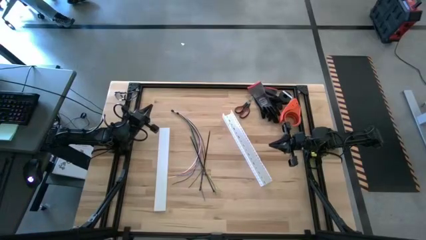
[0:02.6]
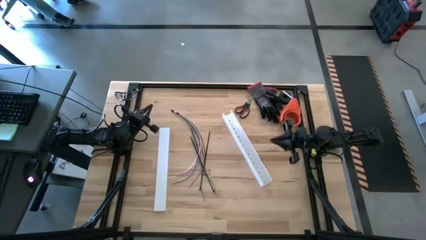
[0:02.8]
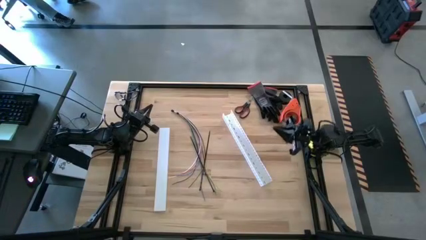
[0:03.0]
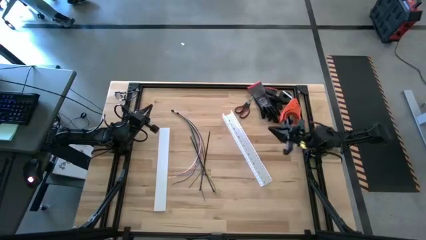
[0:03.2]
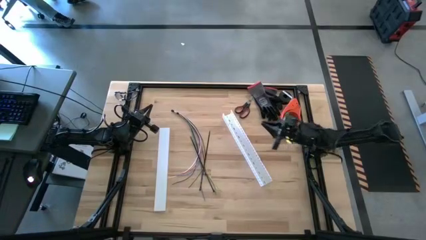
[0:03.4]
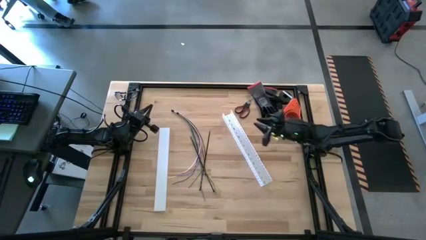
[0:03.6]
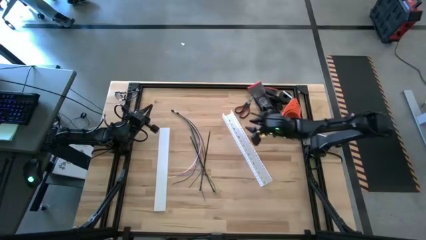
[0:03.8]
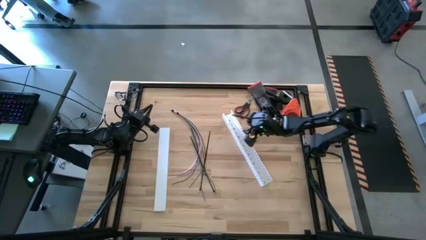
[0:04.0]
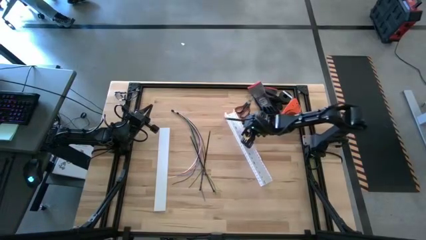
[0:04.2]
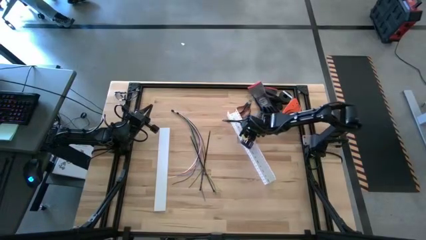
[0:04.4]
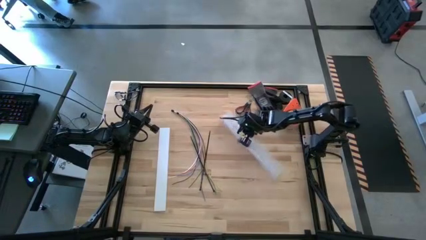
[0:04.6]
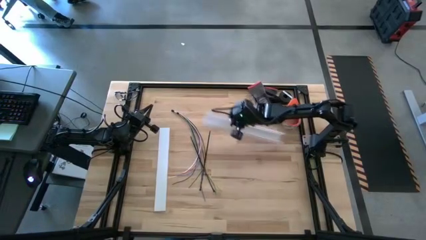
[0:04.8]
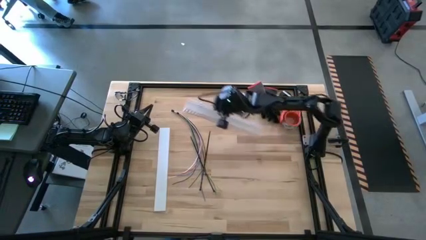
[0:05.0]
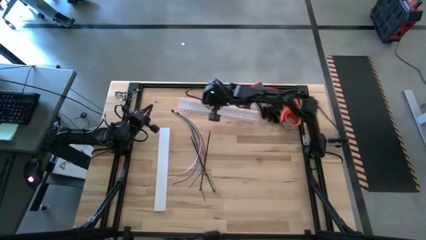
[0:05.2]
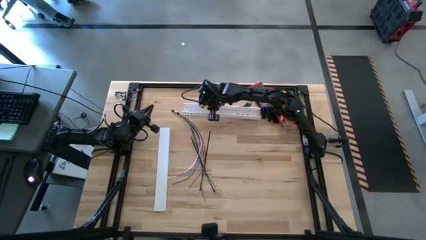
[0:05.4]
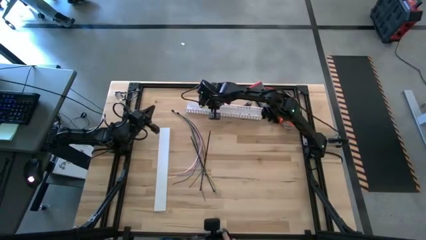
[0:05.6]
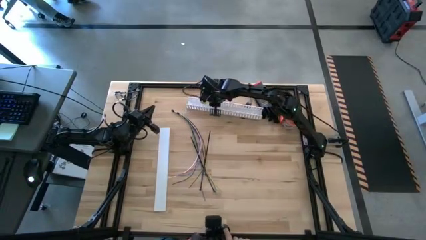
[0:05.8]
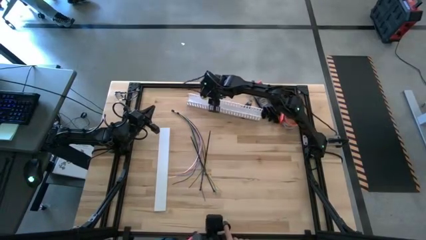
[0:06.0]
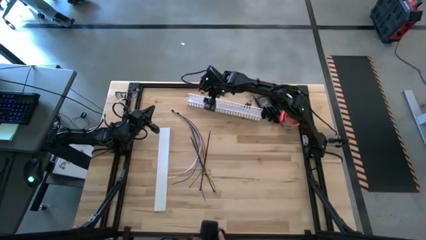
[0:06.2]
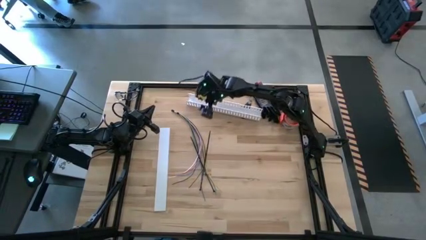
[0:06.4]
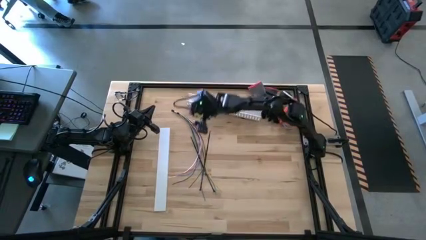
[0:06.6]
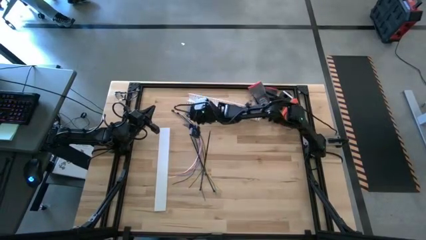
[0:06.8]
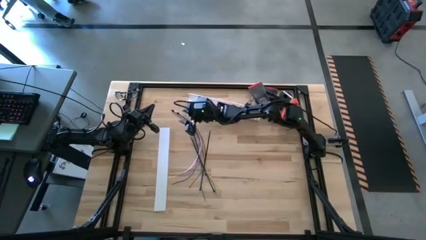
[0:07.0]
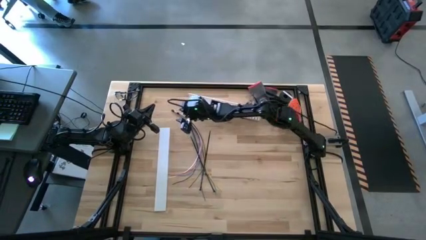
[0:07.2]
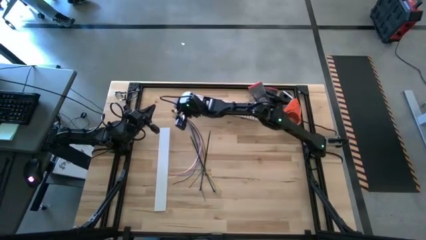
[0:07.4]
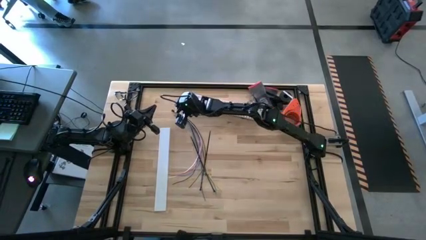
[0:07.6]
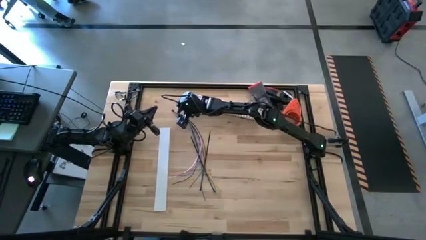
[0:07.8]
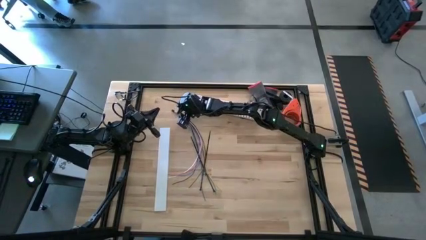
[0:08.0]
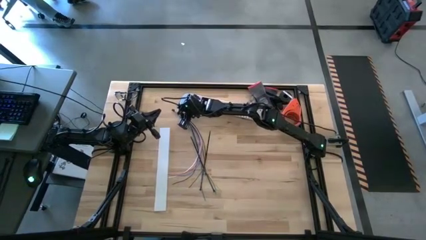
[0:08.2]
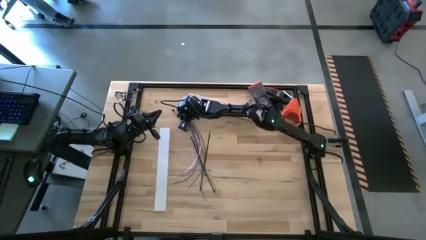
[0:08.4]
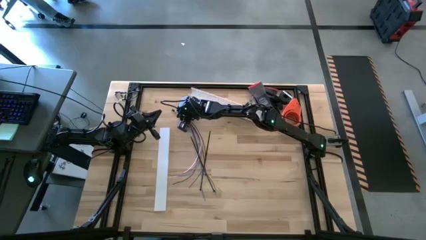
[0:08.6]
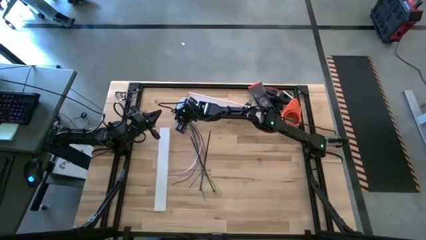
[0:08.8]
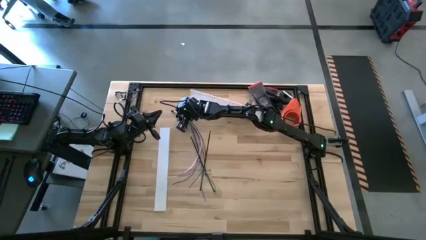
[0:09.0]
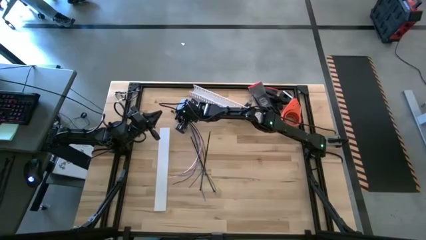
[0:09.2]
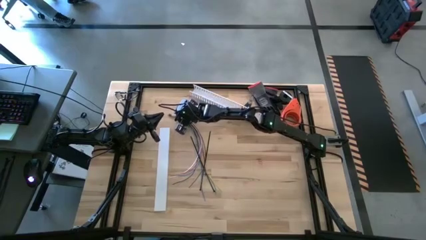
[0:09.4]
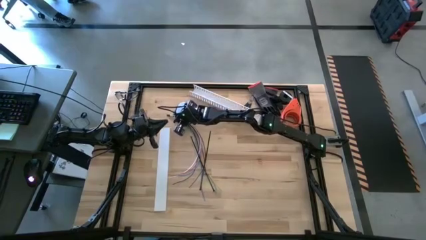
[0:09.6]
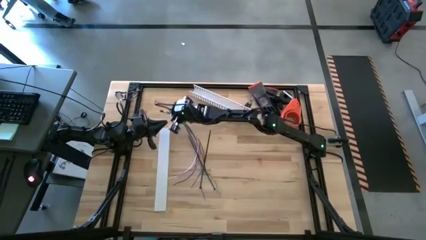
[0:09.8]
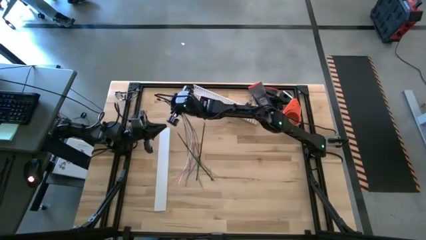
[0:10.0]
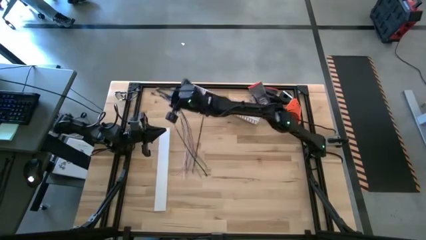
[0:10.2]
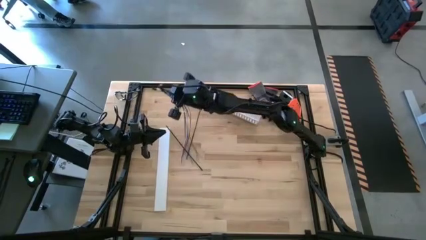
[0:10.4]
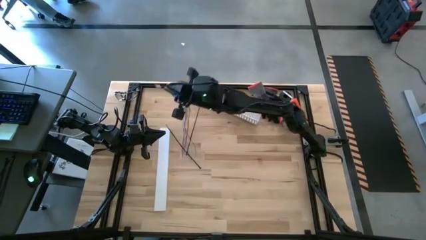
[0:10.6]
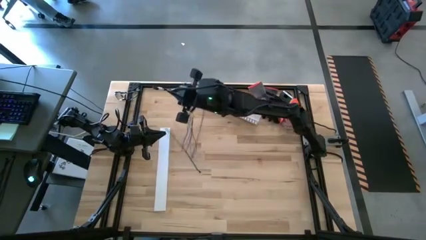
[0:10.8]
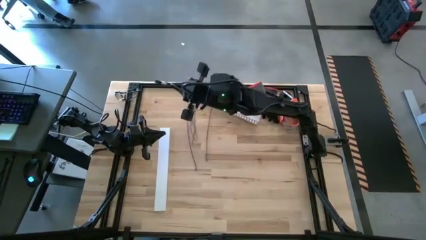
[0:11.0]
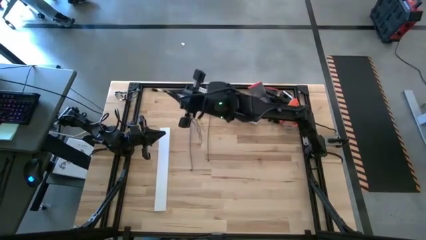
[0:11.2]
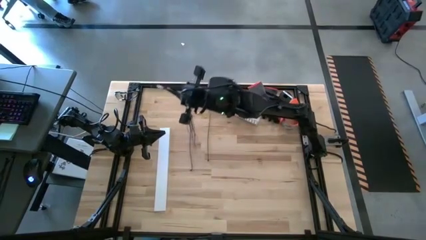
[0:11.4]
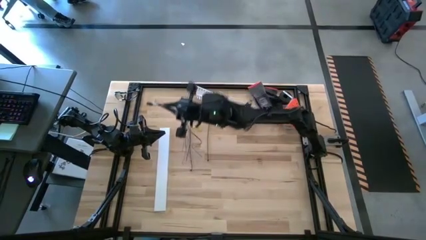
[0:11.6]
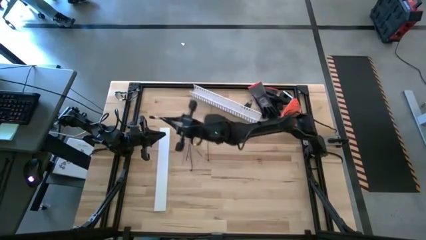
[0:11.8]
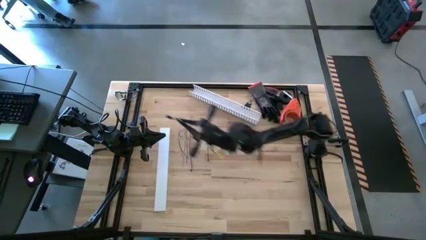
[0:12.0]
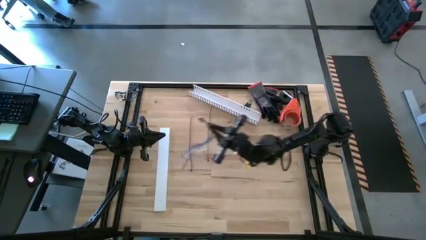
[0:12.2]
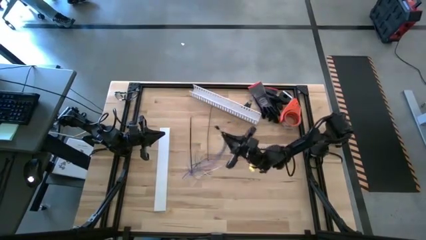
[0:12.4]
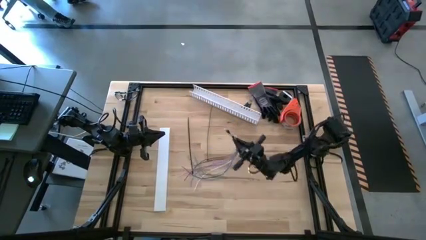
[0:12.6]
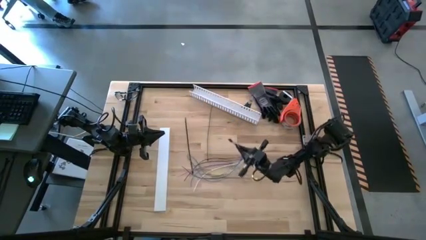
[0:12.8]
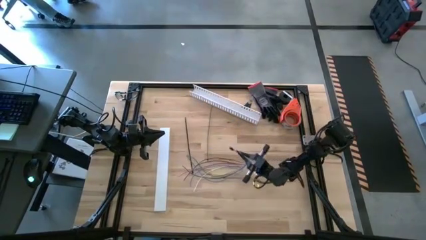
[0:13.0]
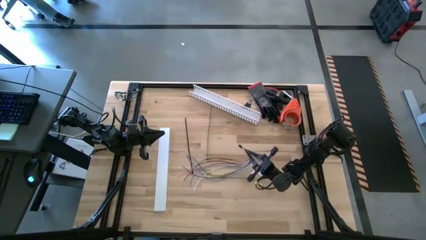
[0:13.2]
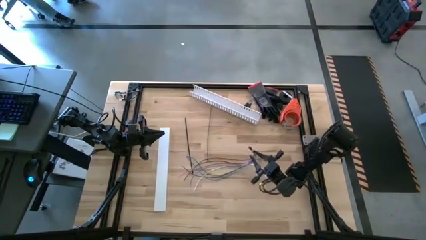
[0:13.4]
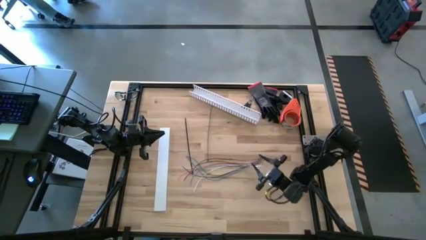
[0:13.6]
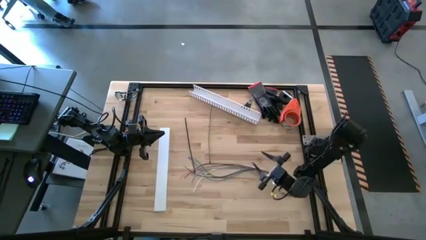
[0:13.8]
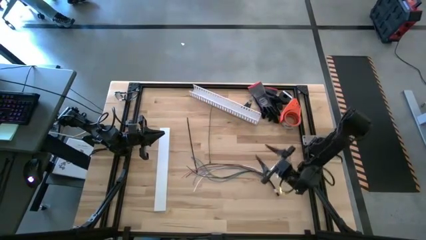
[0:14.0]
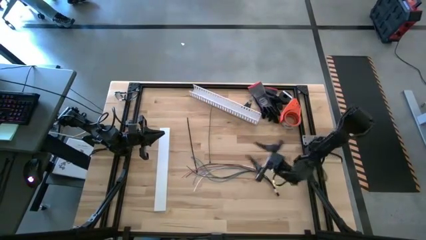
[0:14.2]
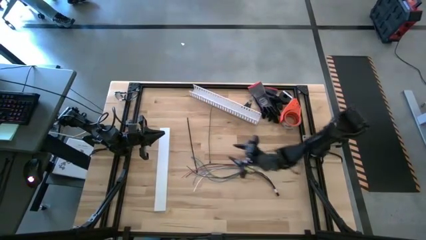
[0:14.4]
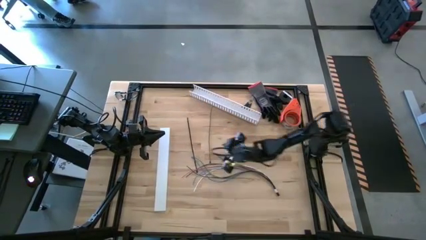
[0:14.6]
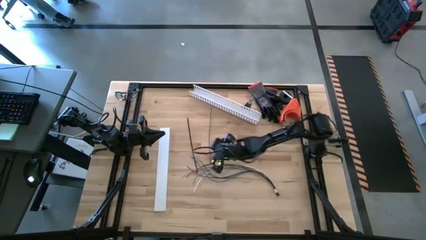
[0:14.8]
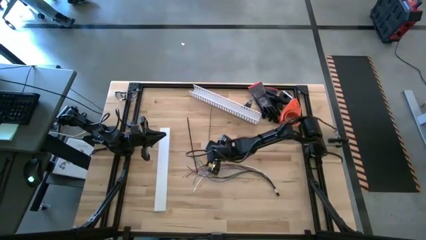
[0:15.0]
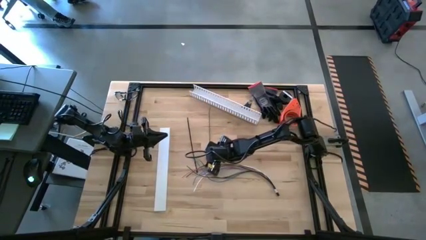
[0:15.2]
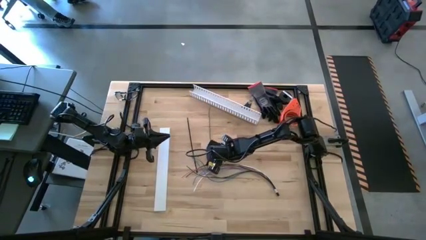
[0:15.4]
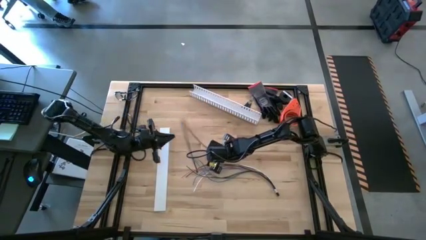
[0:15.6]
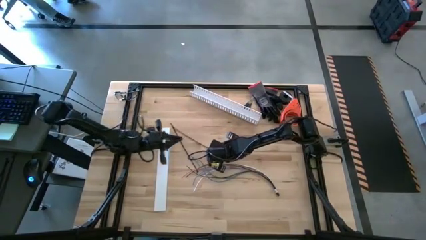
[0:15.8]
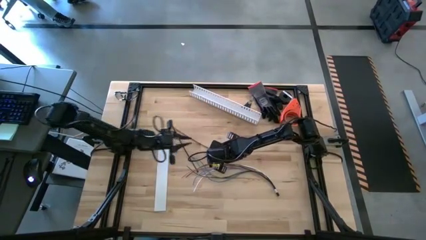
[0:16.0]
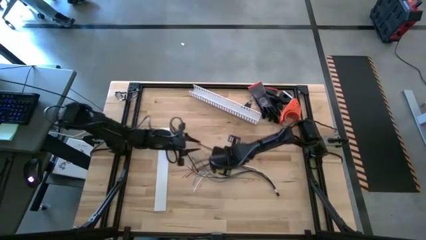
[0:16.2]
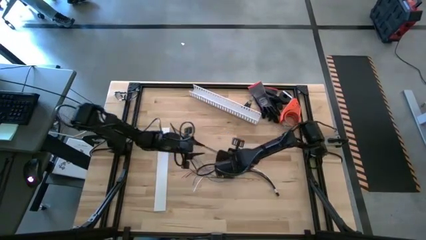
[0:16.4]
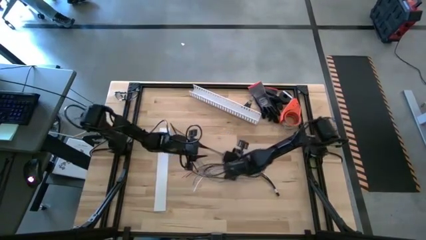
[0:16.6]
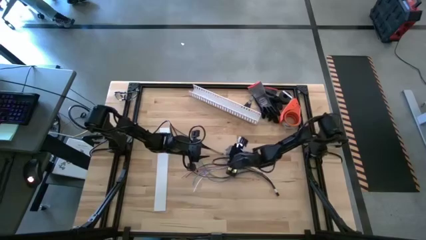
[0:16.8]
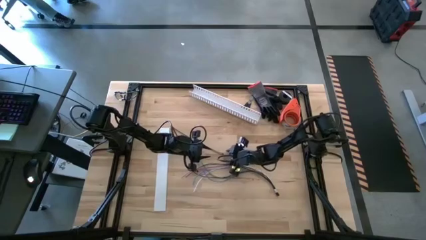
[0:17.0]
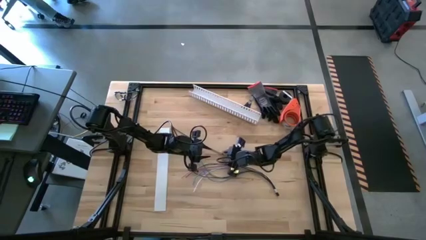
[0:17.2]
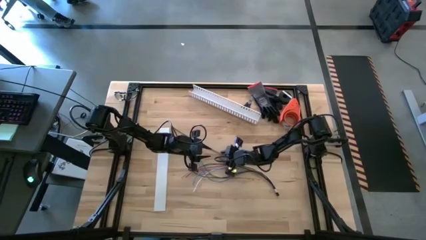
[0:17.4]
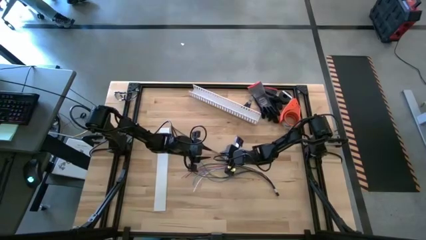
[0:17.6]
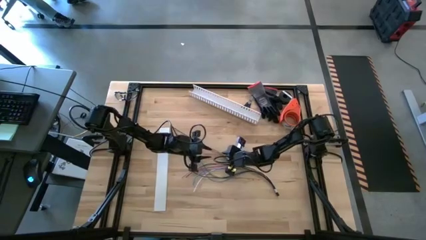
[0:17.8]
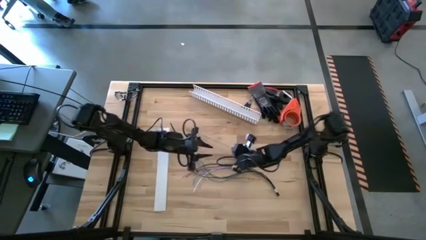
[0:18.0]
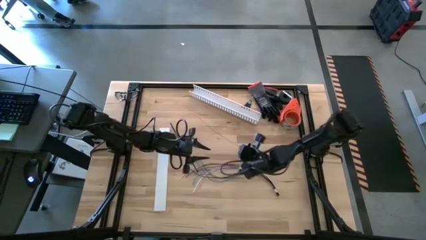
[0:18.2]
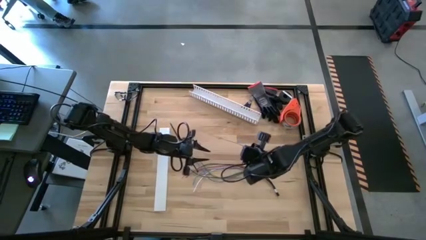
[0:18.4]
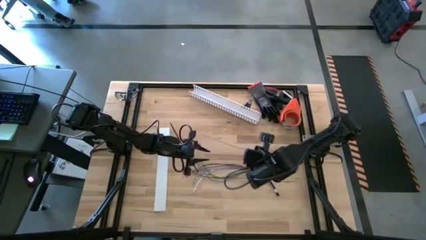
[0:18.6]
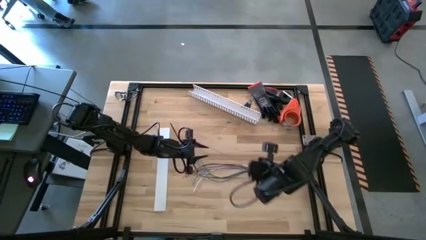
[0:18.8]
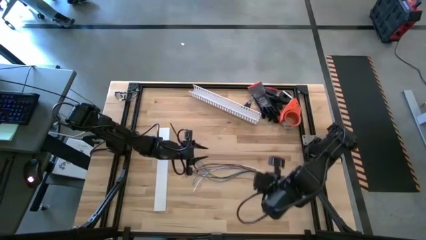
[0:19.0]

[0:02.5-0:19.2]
Task: Ziptie cables
Wrap the right zip tie on the cable
